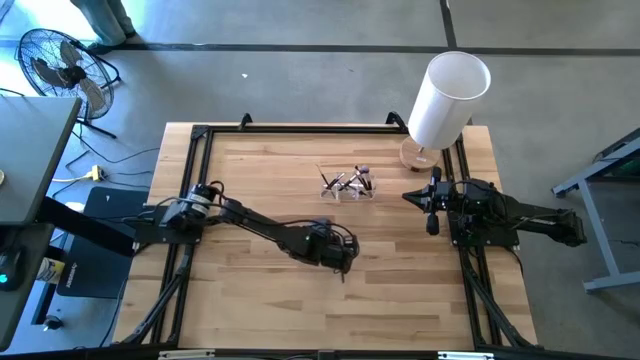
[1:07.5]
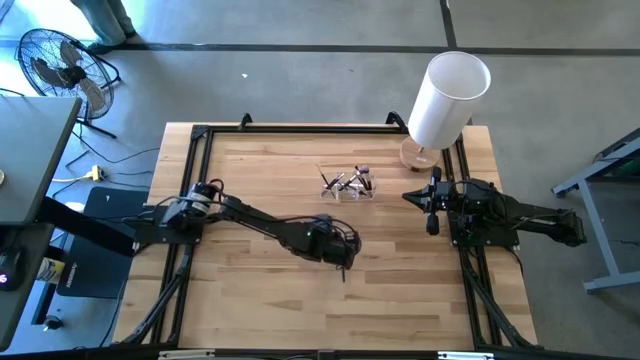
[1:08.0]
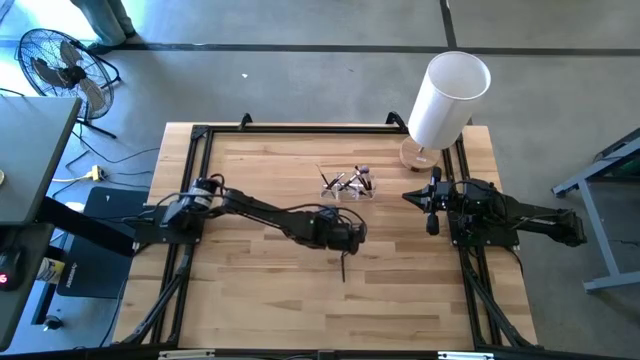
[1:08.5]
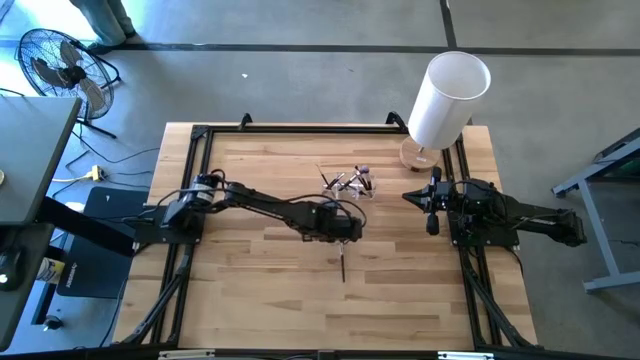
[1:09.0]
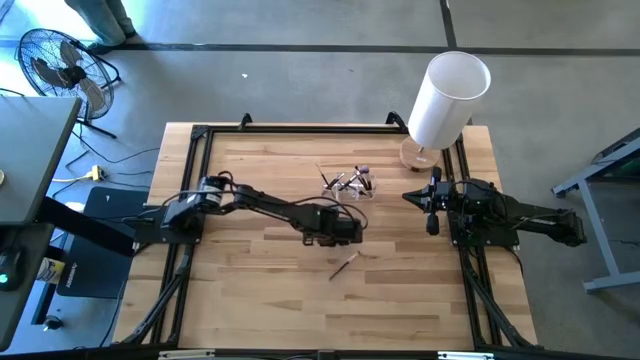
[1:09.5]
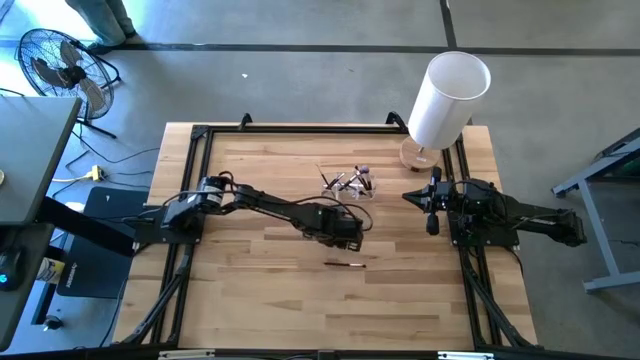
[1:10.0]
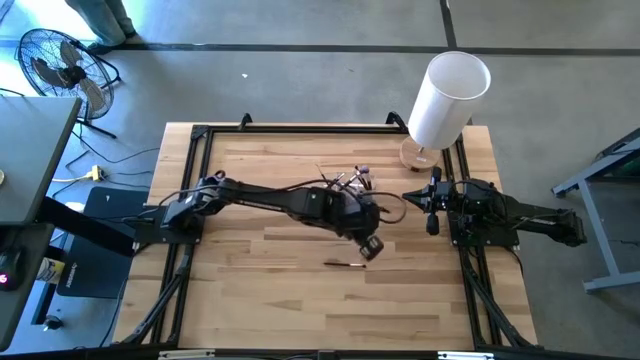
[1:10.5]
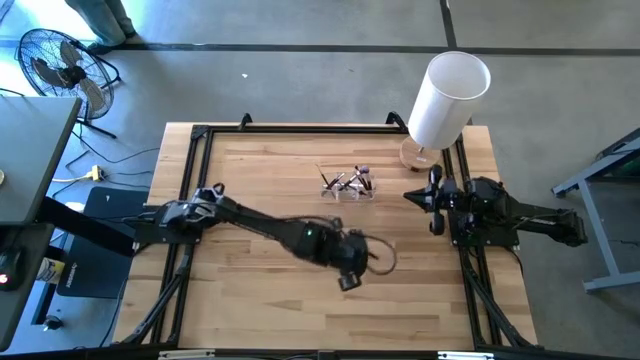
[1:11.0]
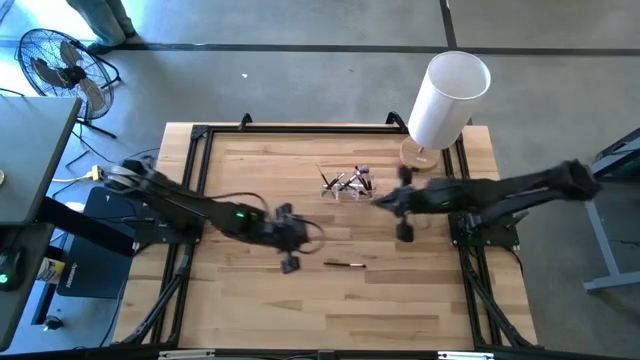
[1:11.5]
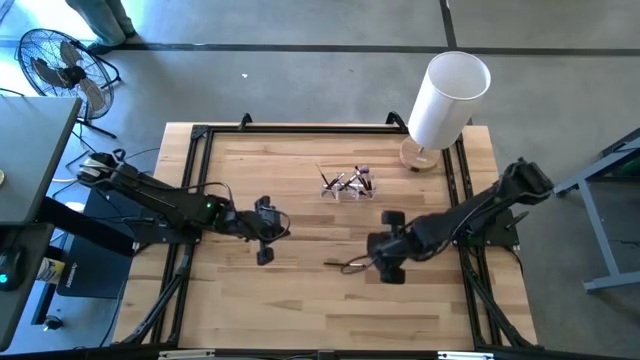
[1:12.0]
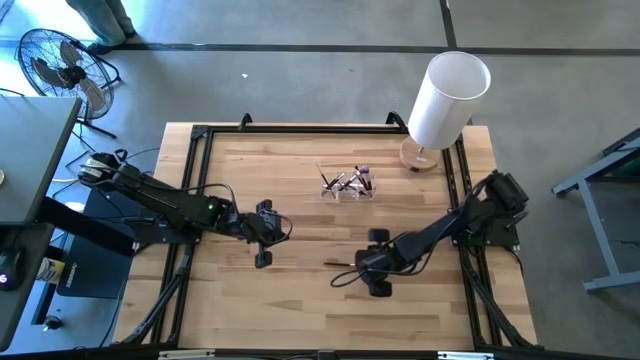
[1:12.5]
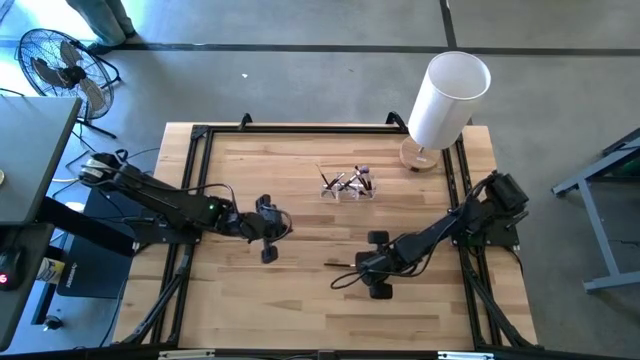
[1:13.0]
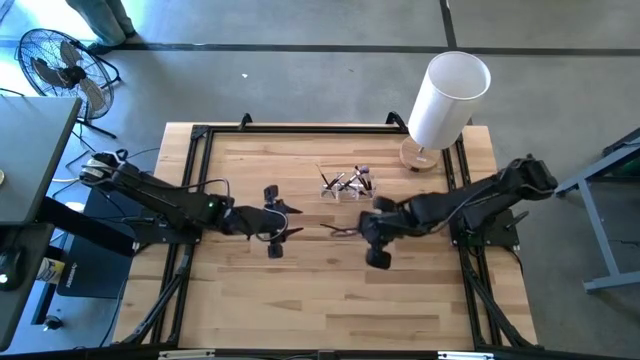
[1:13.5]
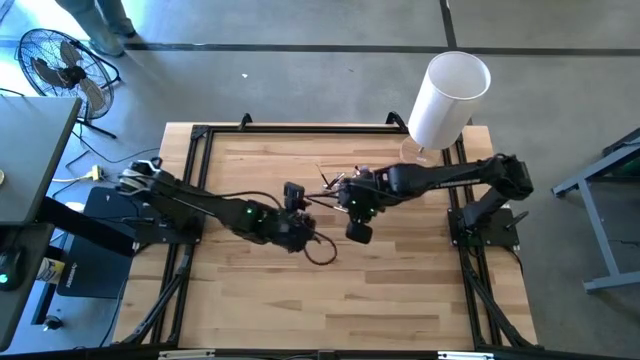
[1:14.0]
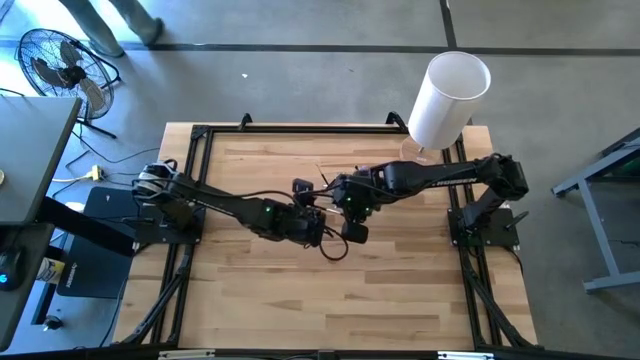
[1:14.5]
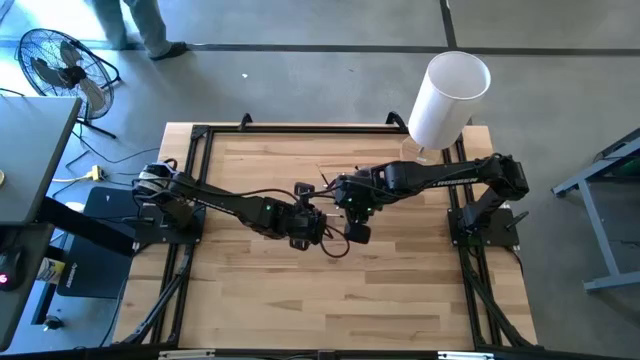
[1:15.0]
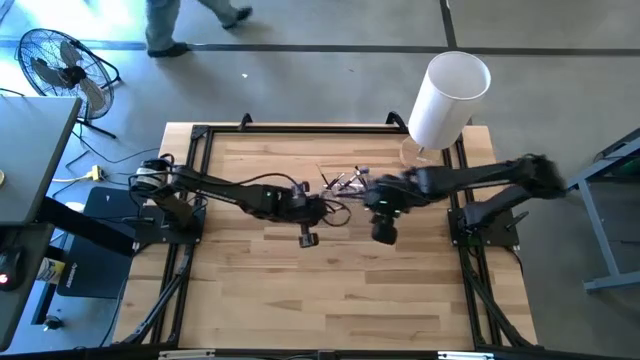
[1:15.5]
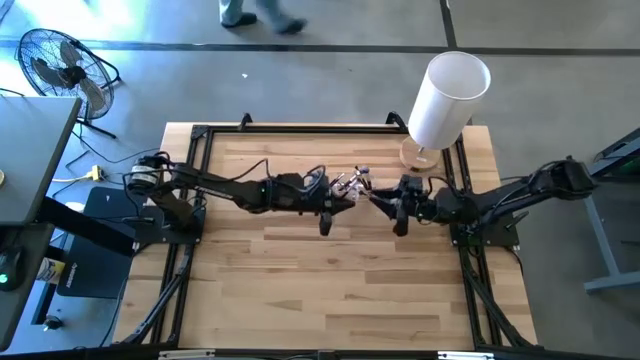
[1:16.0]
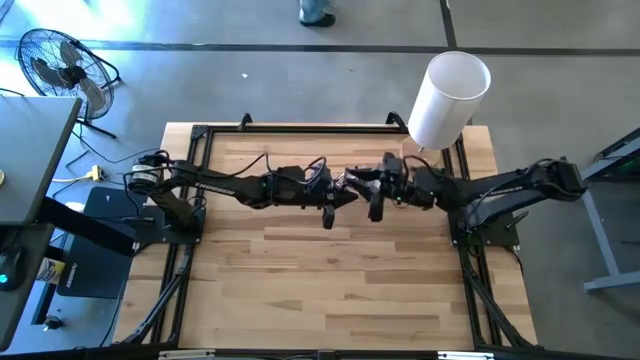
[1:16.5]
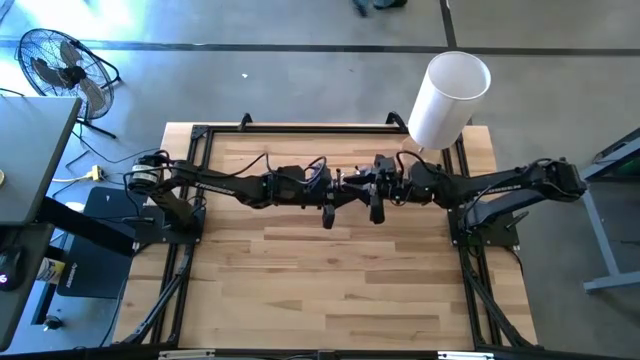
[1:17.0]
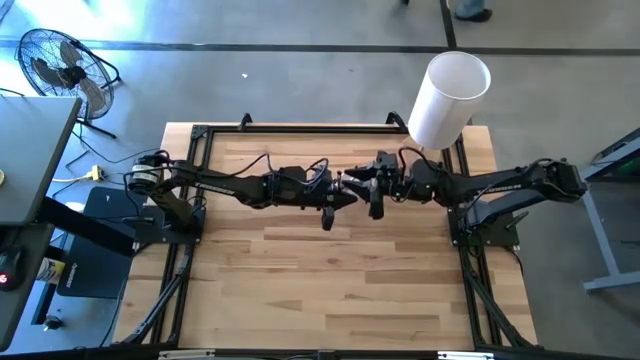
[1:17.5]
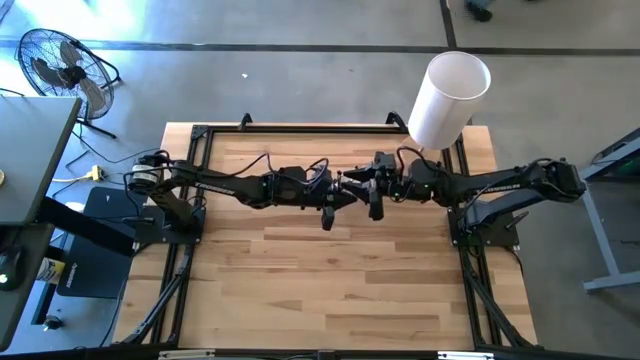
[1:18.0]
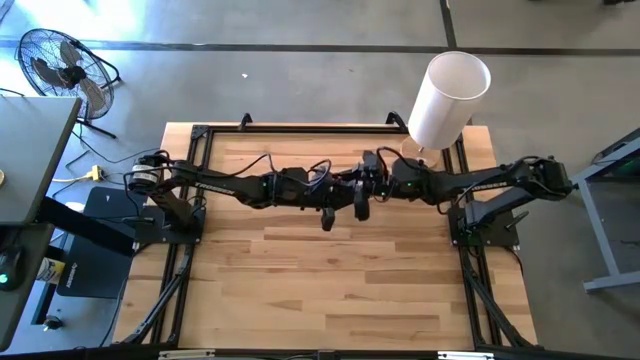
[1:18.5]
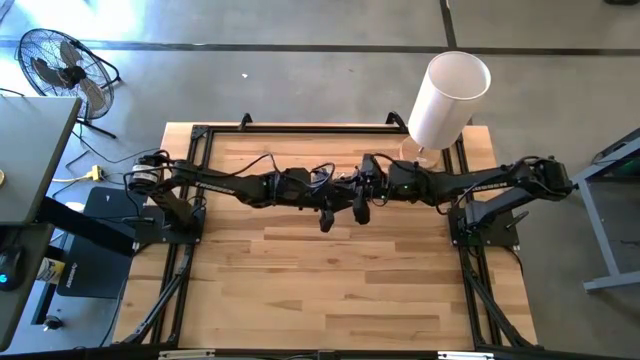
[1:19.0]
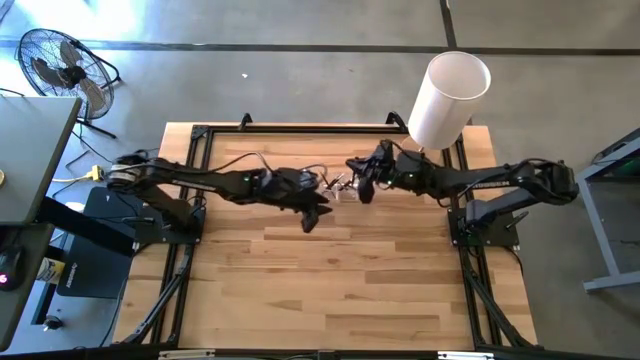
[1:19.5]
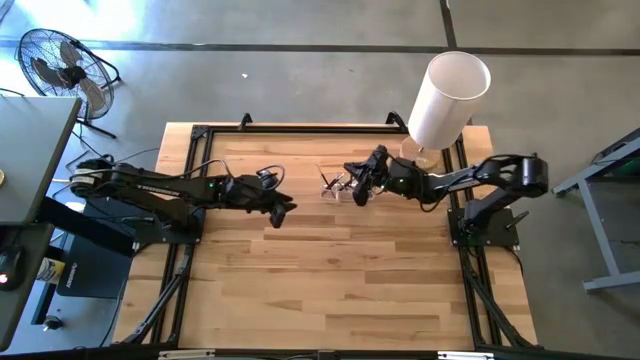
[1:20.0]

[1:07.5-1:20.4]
Task: Put items in baskets/containers
Put the eyeshadow brush into the middle section of the transparent organizer

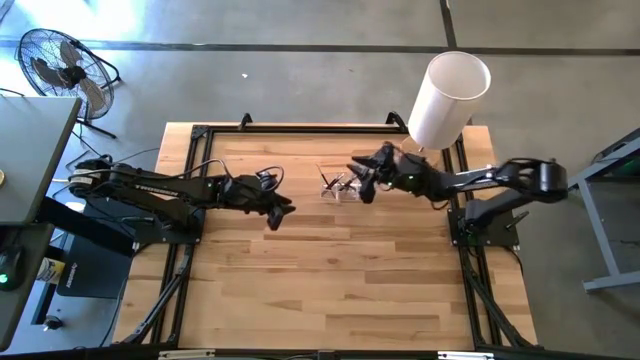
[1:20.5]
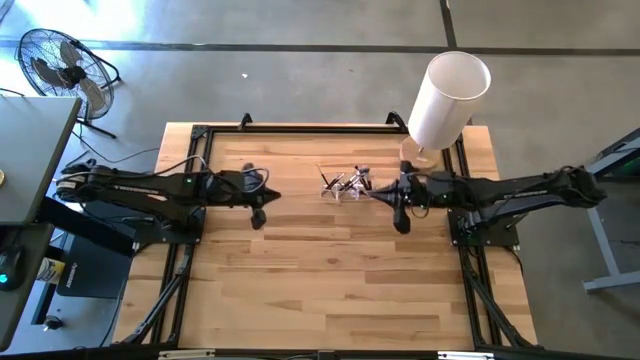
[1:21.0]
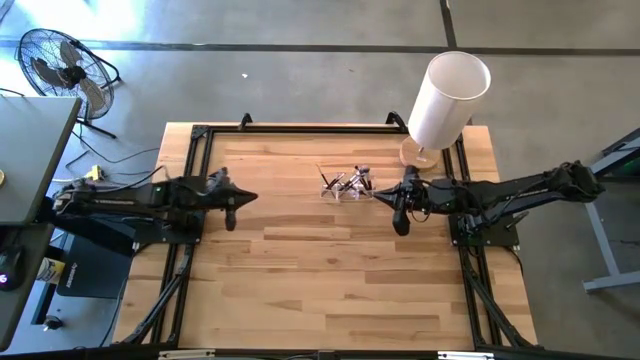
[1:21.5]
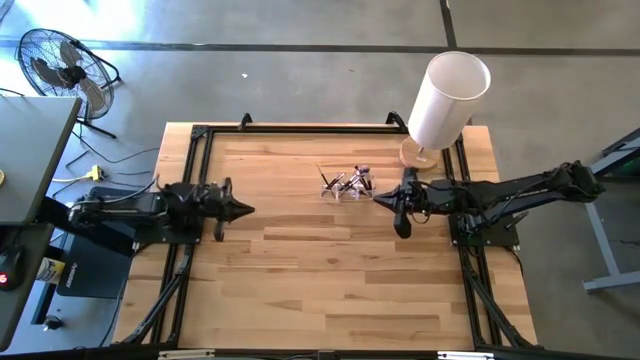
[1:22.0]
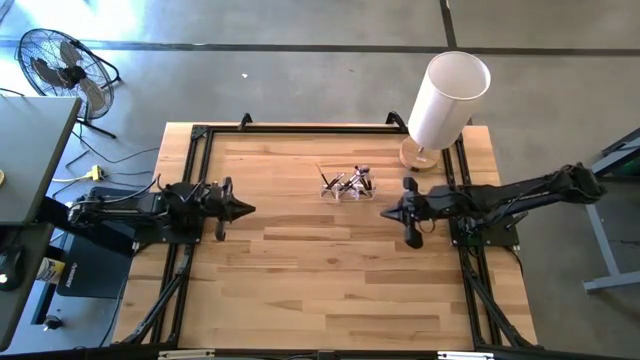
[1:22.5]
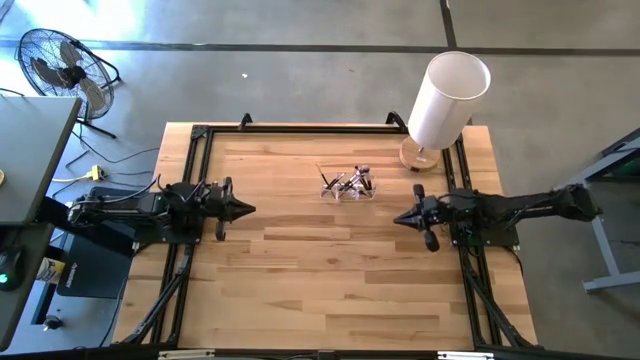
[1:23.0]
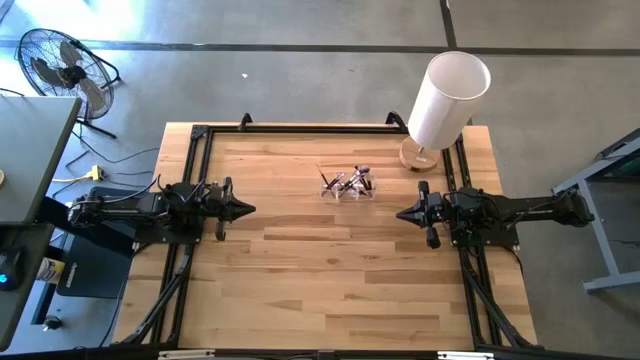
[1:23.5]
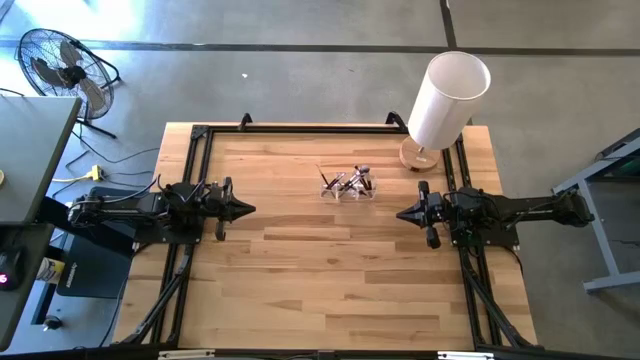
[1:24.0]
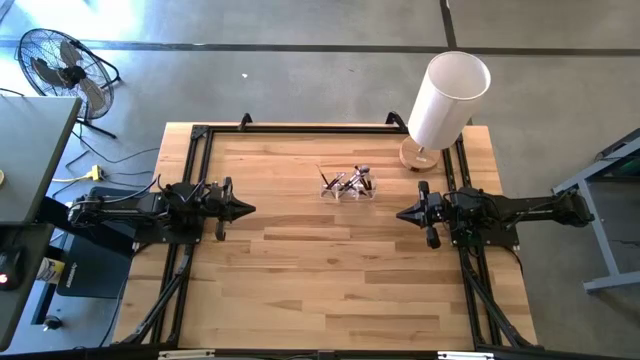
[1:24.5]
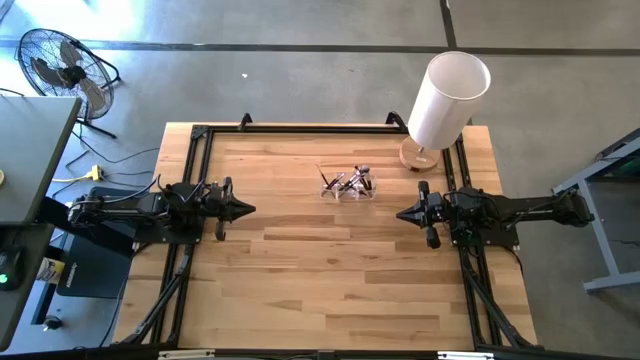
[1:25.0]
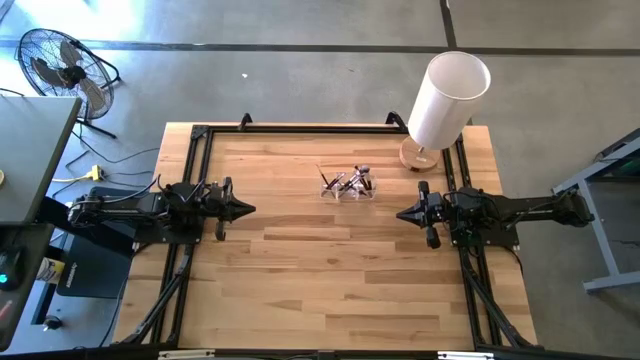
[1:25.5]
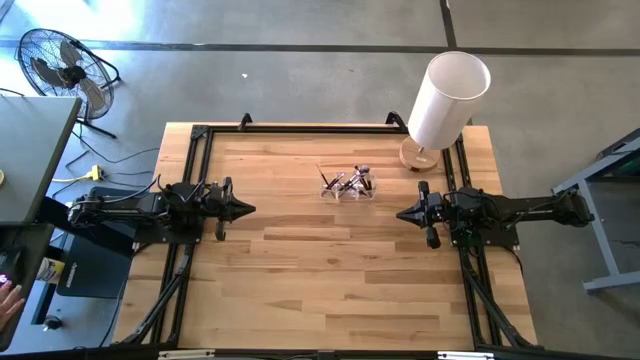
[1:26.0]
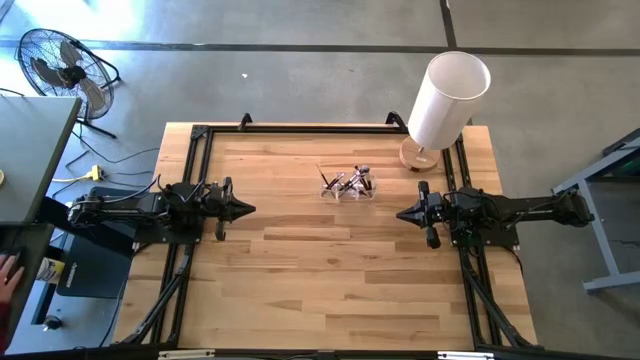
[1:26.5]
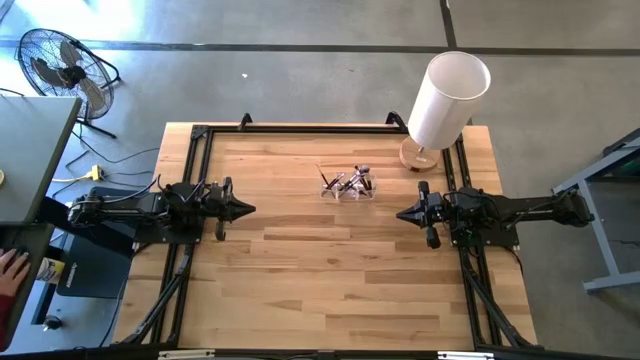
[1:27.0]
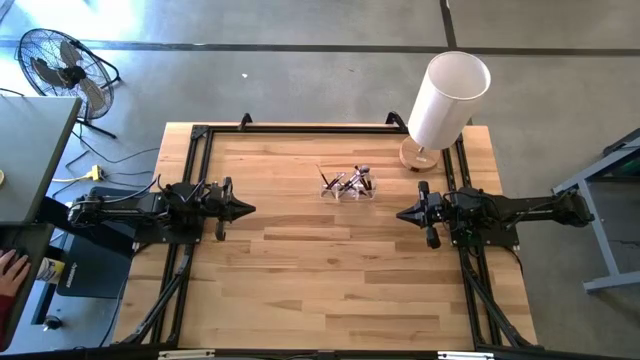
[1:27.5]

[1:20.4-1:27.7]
Return to Home Position
